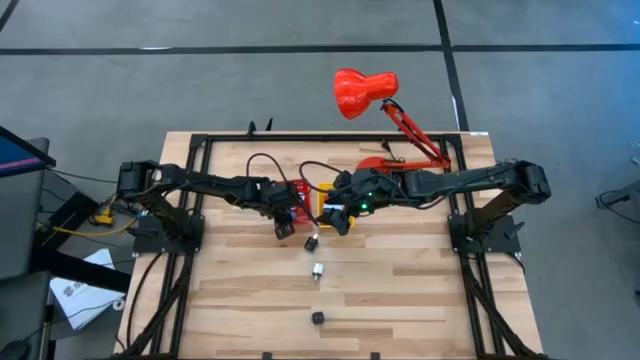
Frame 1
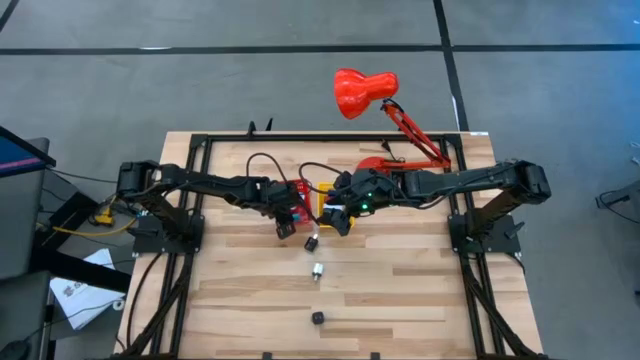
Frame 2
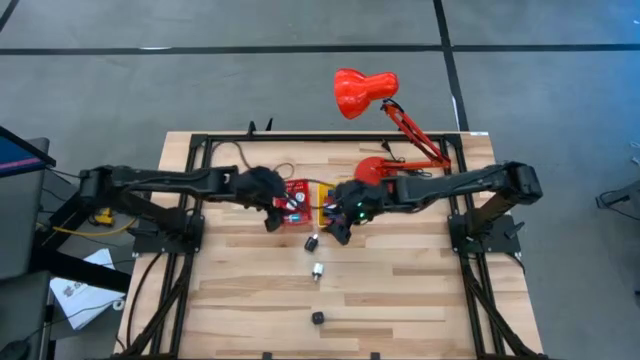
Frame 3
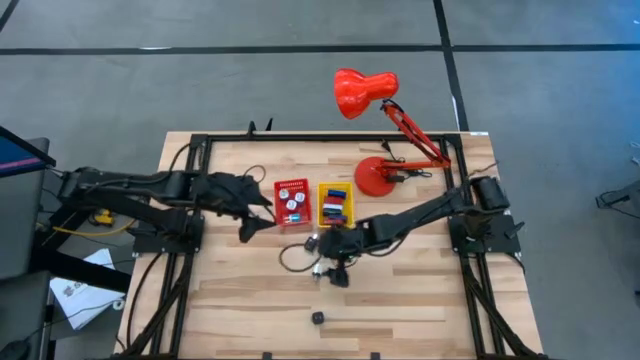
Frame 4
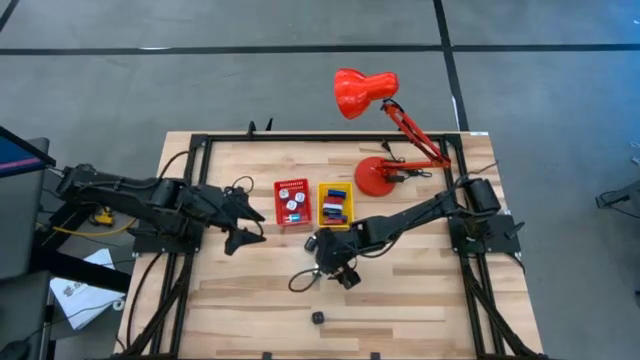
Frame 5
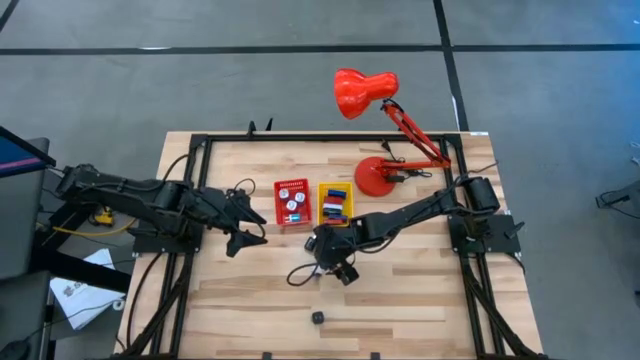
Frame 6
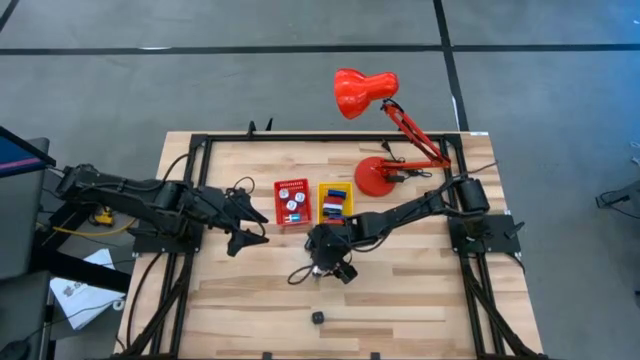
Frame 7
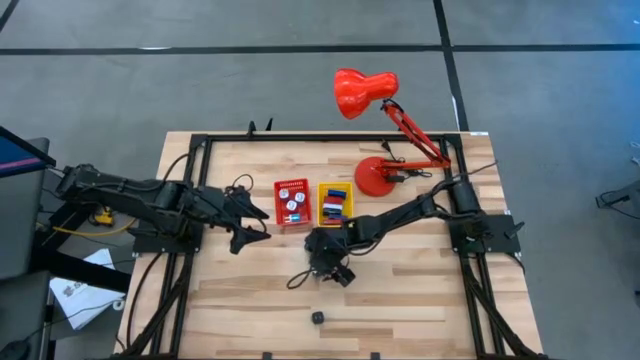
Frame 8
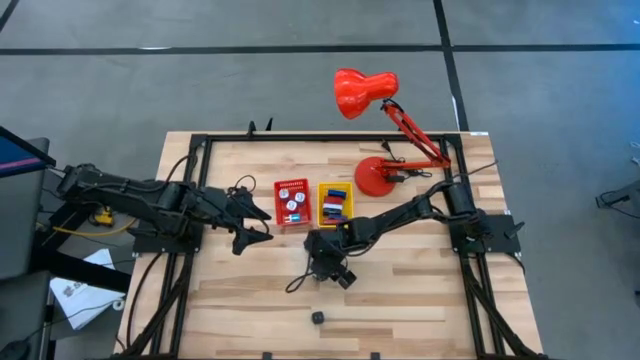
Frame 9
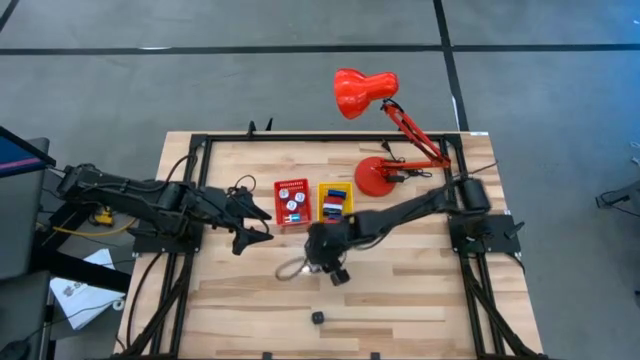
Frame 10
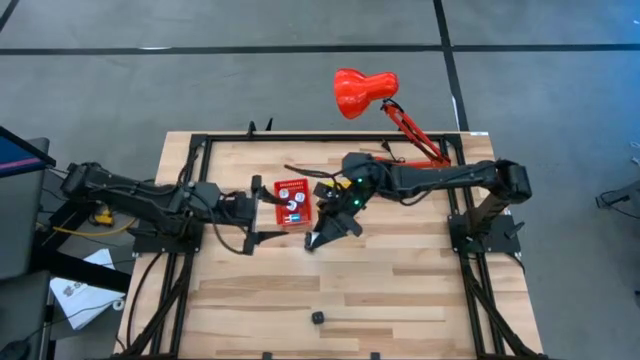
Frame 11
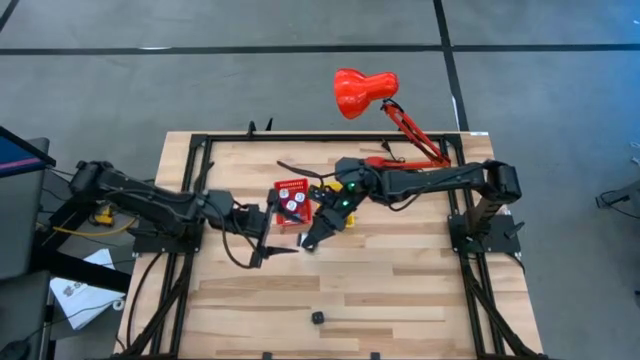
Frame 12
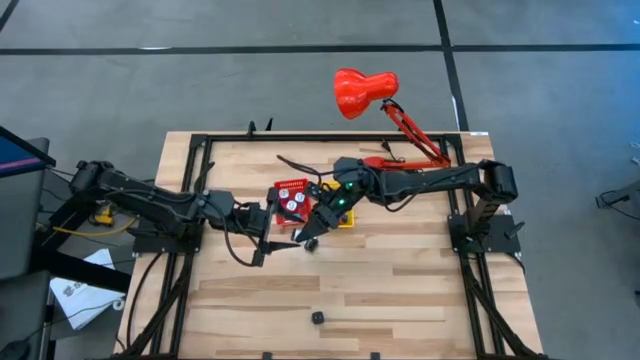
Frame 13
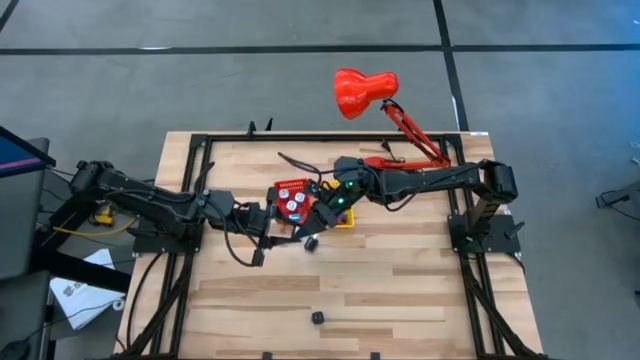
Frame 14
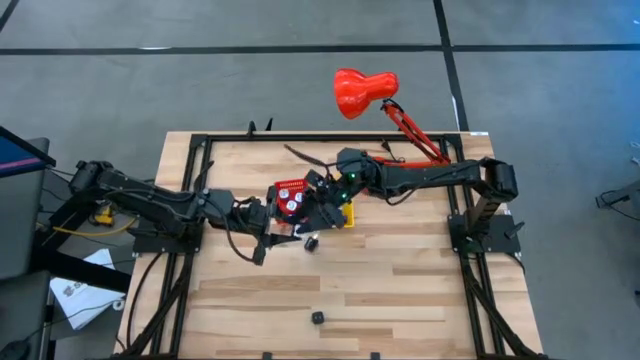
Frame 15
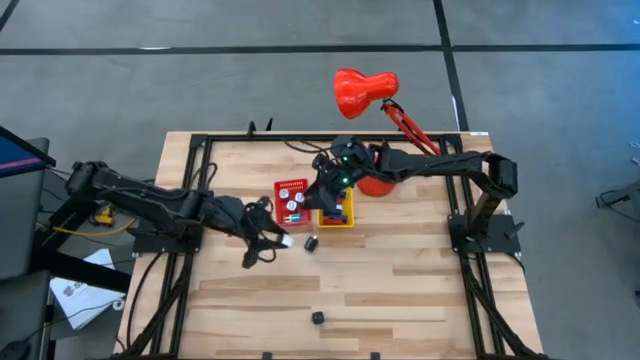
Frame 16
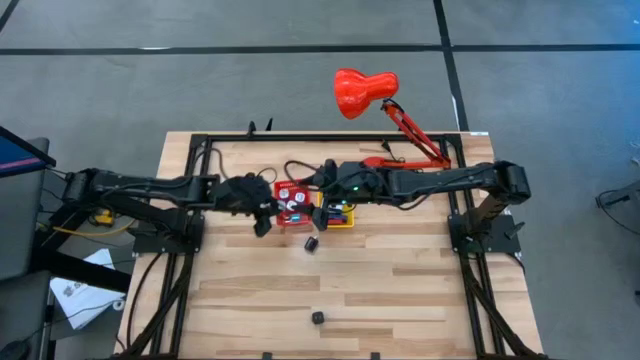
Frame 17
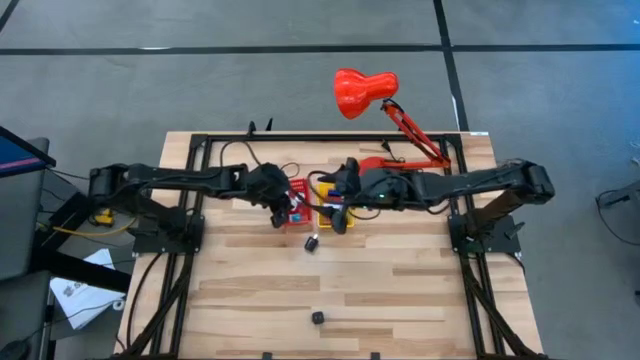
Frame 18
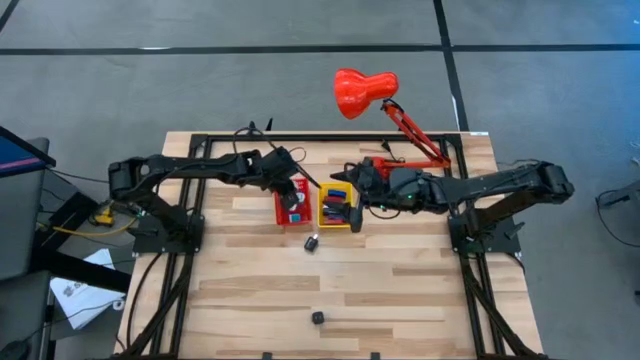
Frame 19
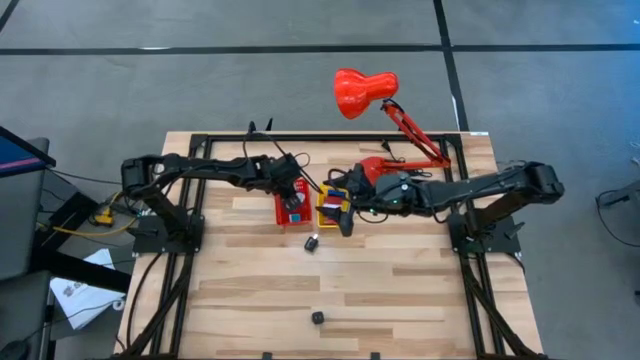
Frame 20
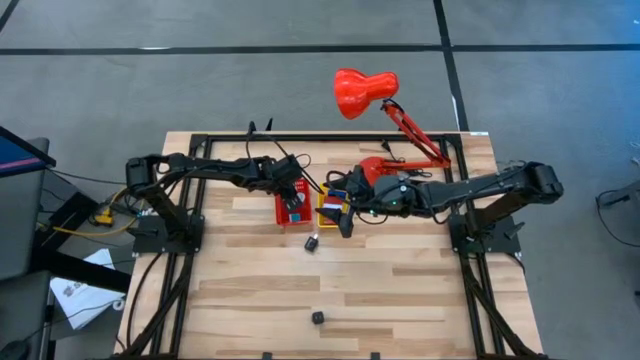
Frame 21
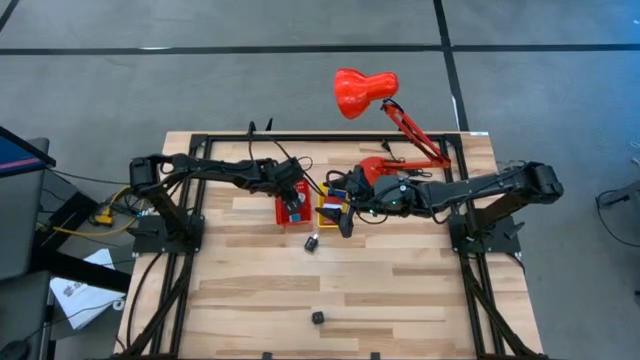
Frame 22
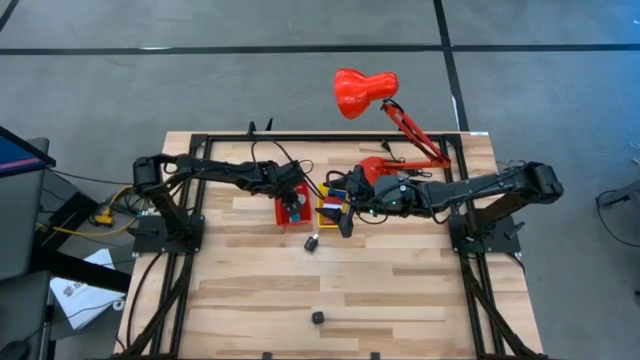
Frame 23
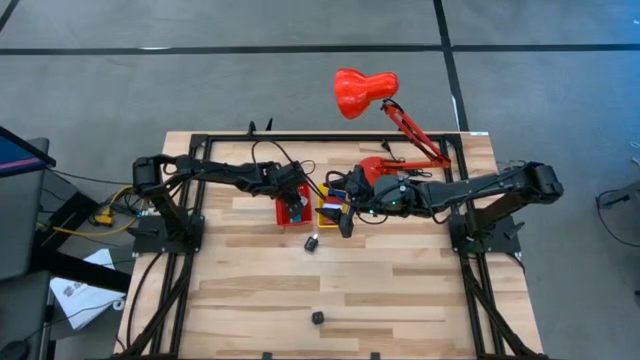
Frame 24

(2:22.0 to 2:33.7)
Task: Pick & Place Office items
Put the white charger adapter into the red basket

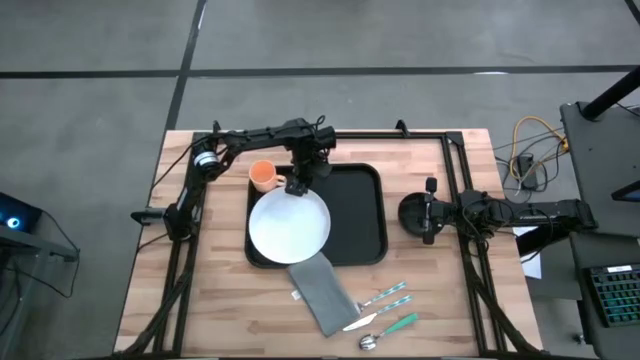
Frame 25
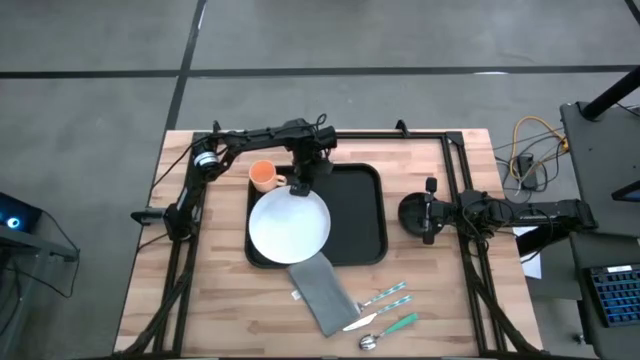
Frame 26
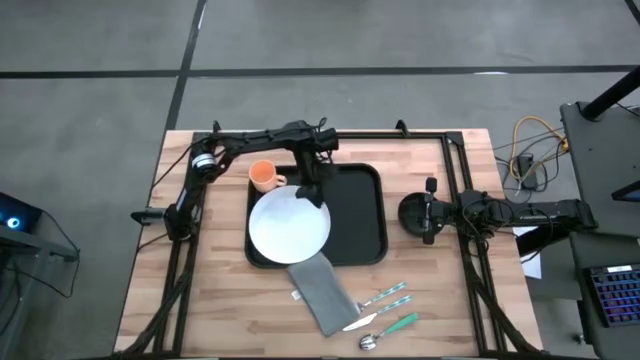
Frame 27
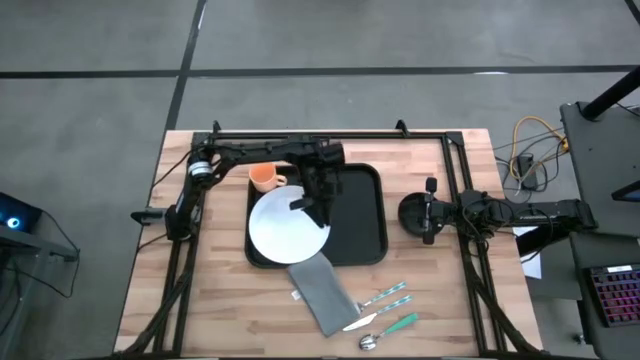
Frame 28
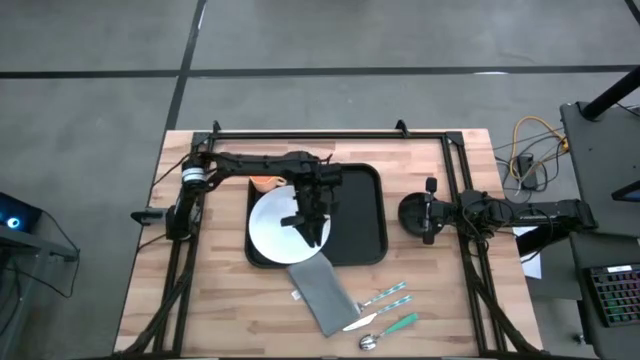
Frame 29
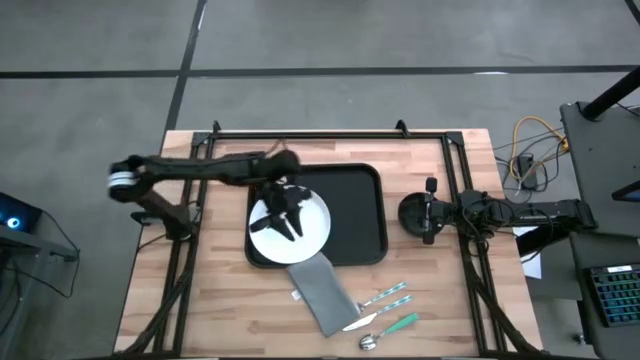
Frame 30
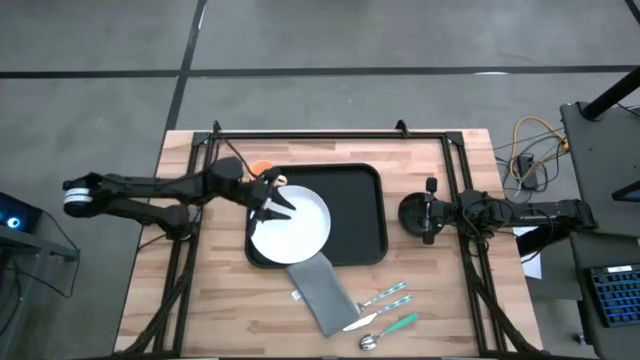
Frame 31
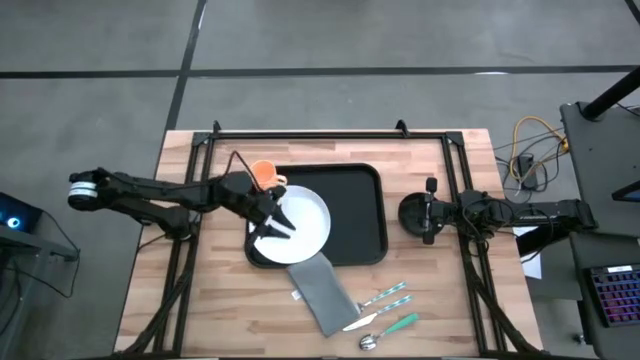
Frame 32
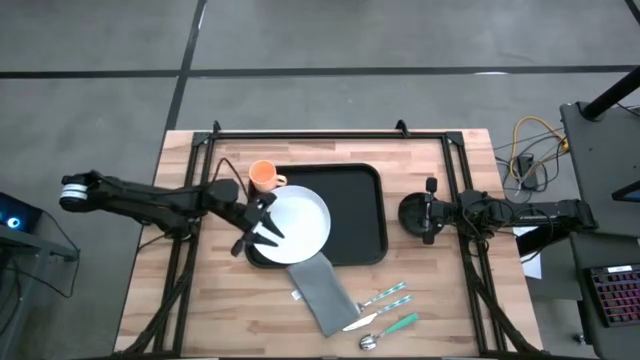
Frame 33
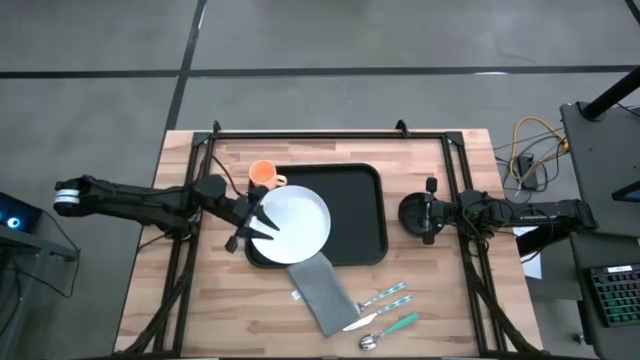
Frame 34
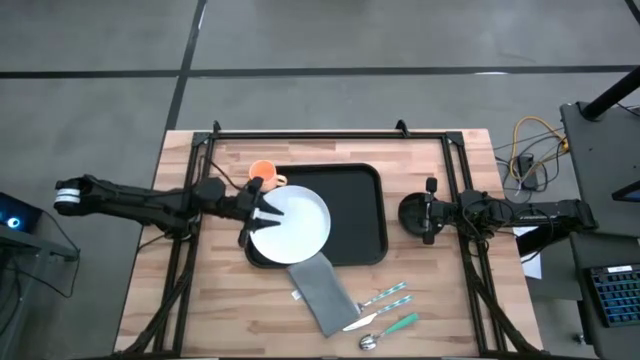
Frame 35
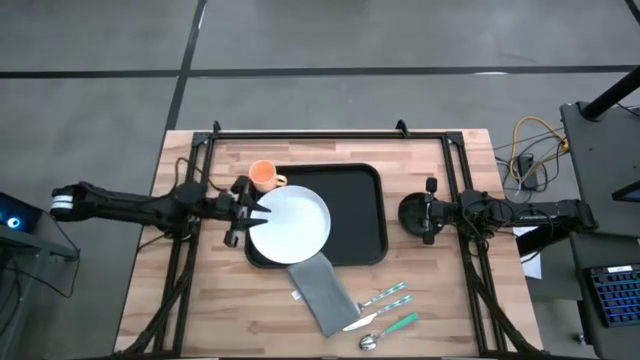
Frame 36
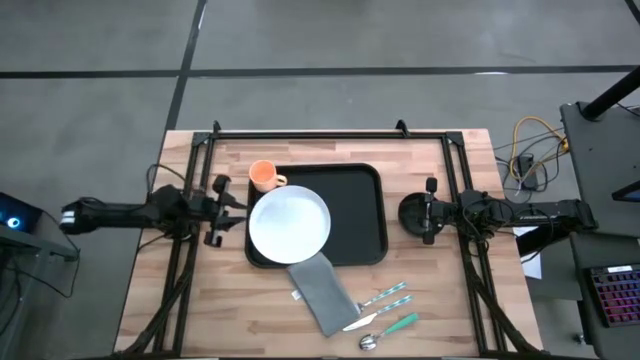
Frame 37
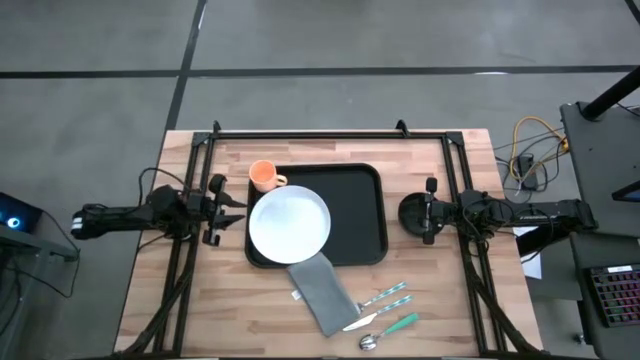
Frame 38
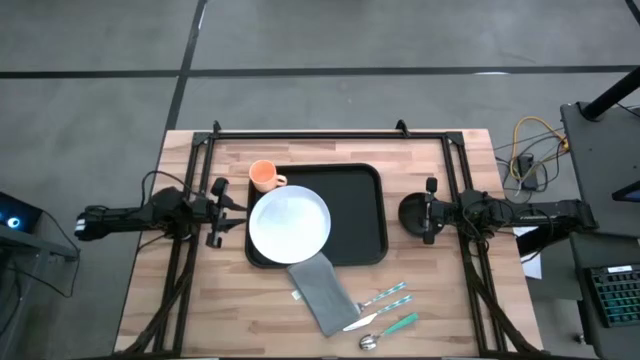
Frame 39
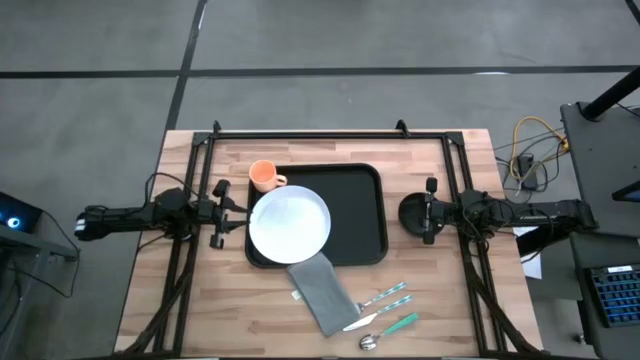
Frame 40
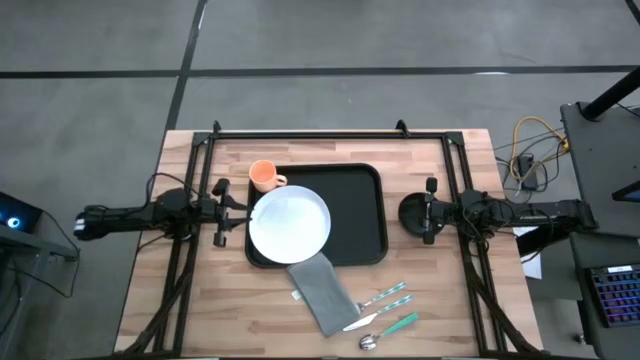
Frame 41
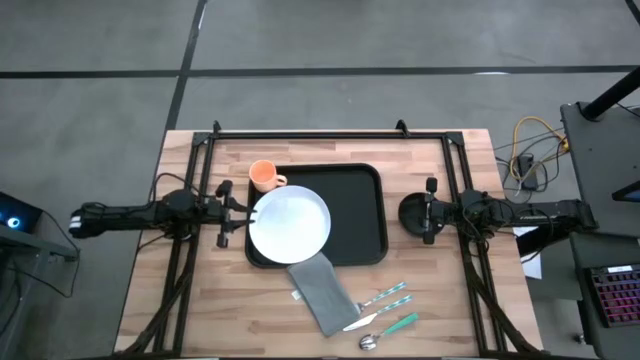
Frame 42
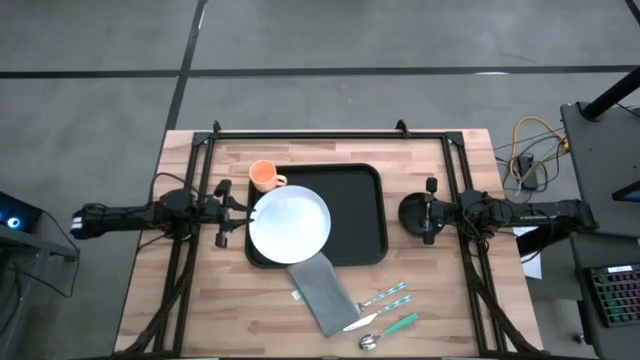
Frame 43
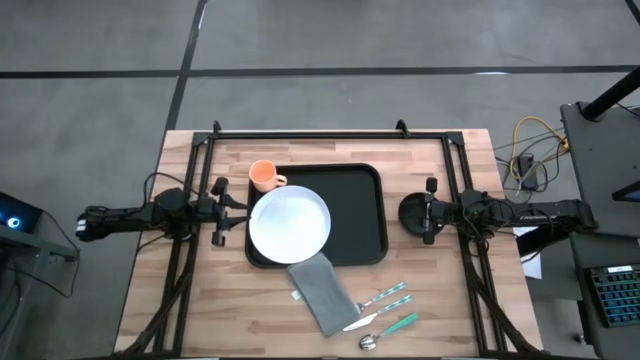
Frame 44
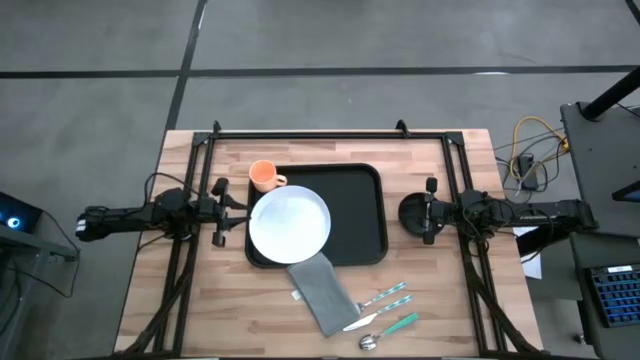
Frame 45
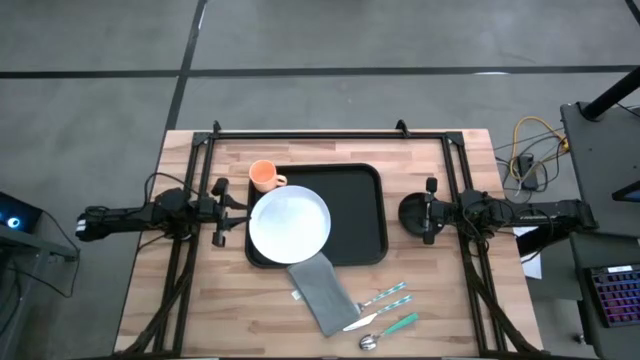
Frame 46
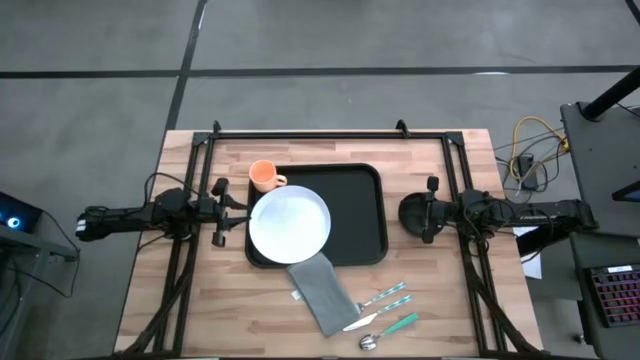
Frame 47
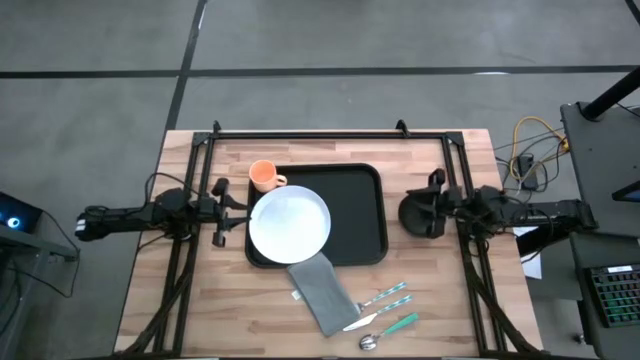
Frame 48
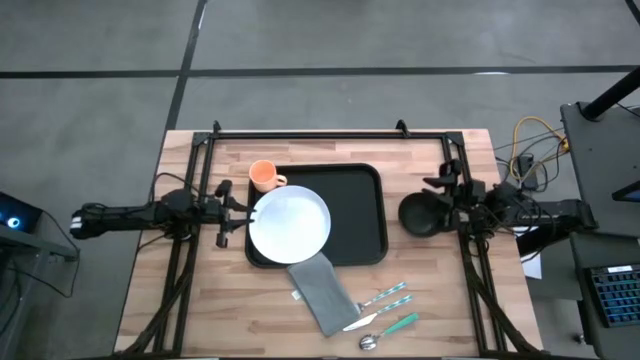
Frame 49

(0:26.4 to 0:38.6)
Task: Set up tray
Put the black bowl on the white plate
